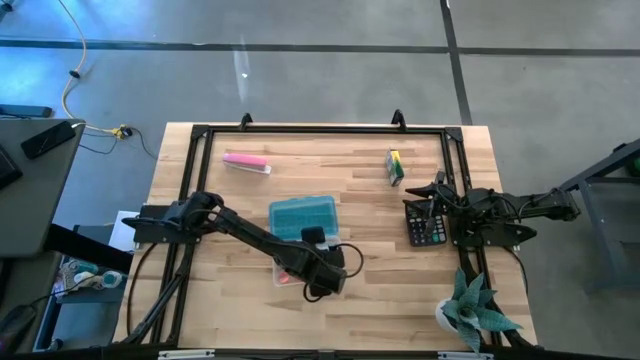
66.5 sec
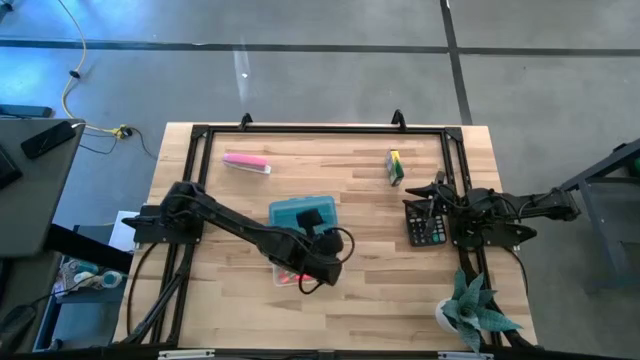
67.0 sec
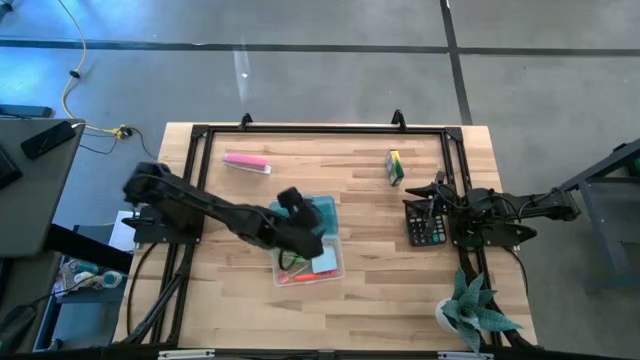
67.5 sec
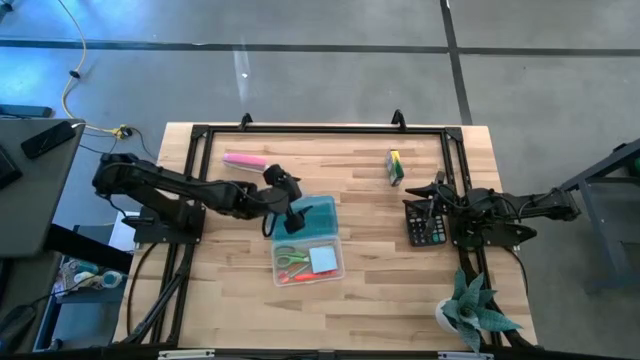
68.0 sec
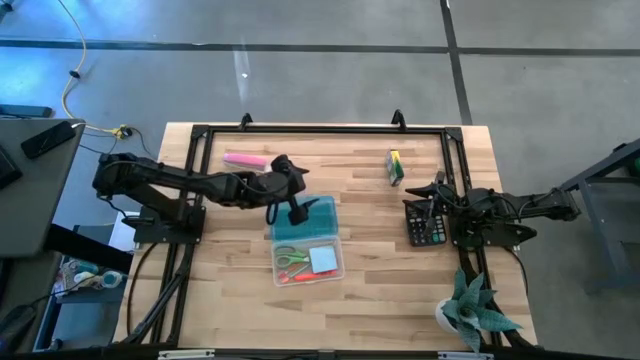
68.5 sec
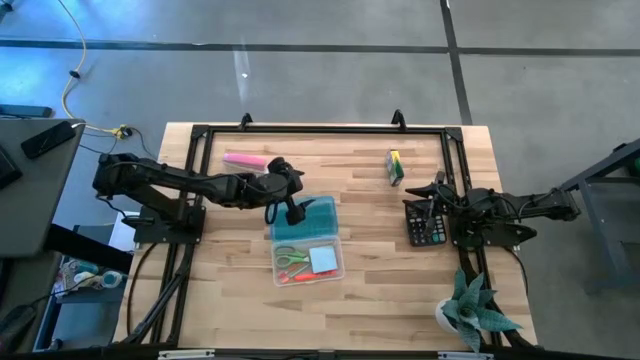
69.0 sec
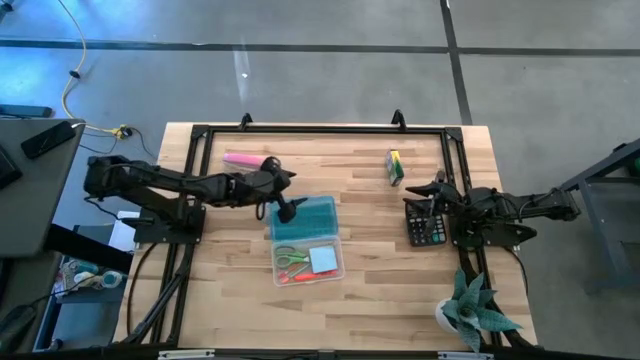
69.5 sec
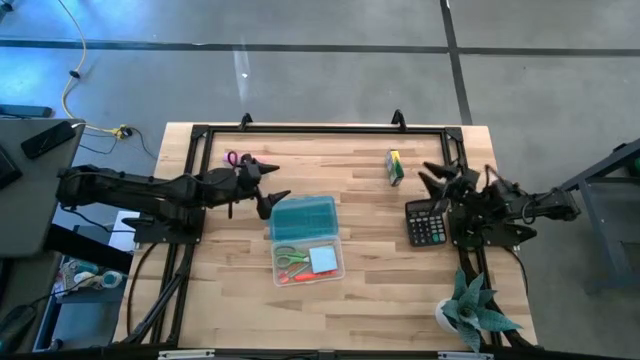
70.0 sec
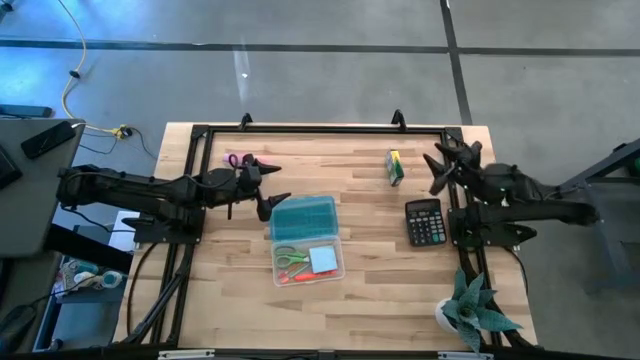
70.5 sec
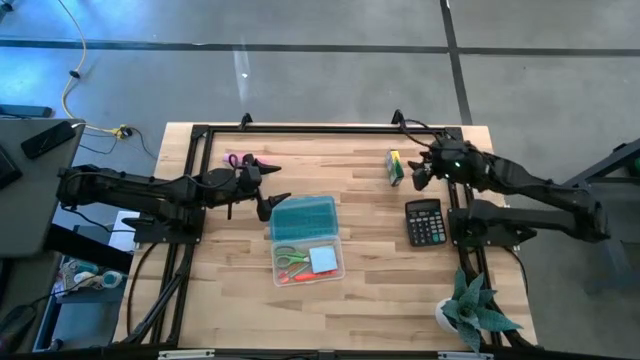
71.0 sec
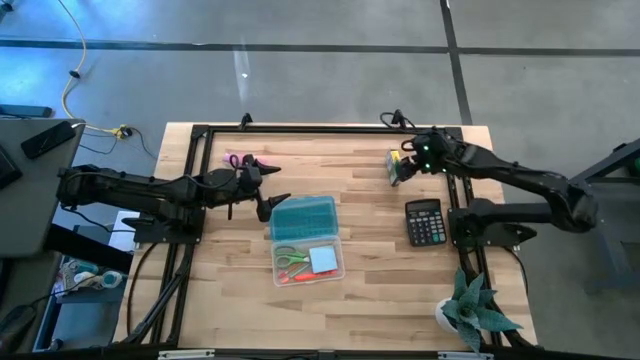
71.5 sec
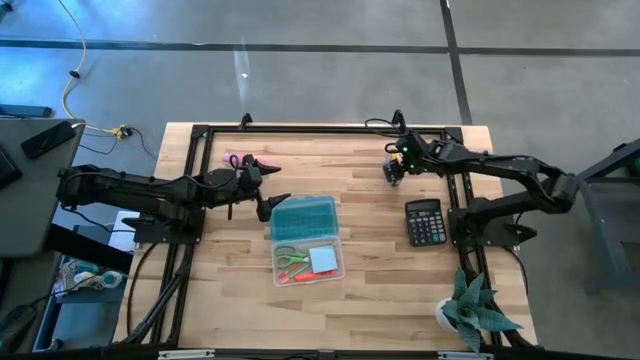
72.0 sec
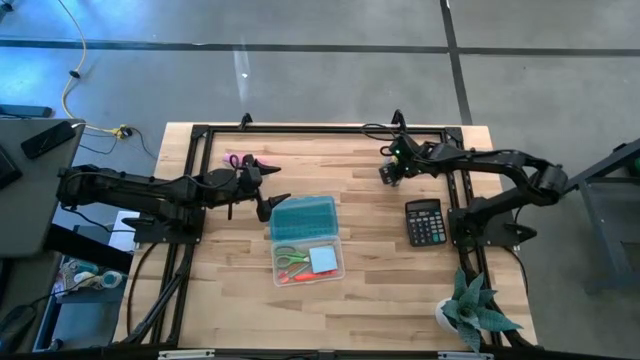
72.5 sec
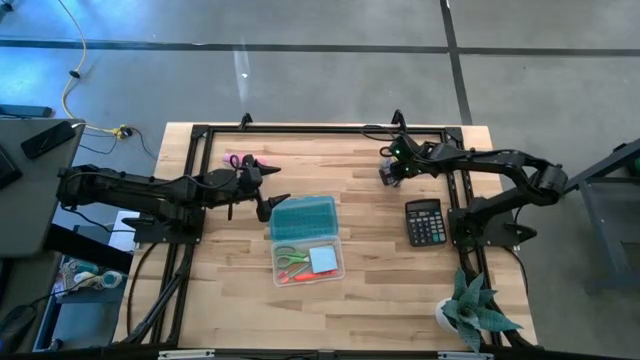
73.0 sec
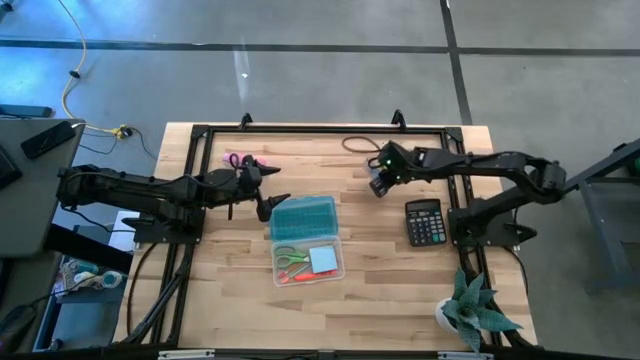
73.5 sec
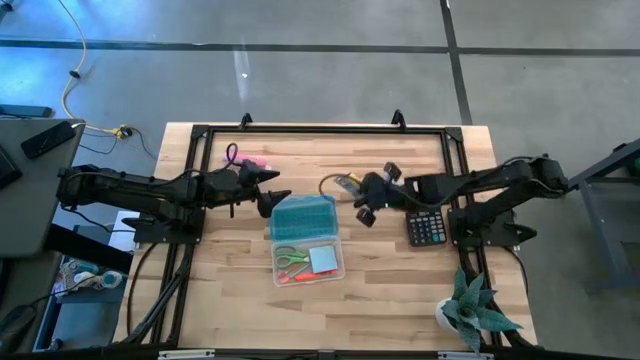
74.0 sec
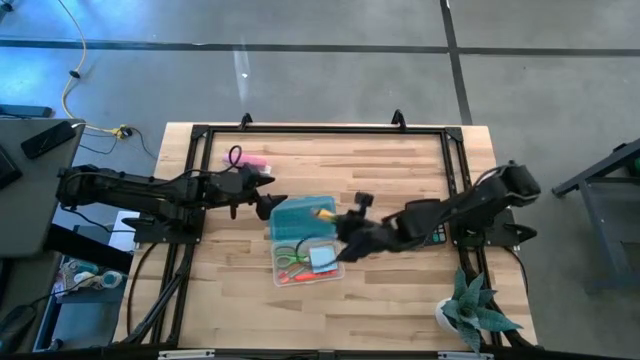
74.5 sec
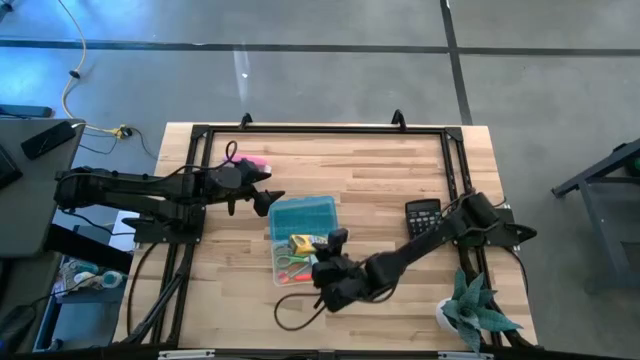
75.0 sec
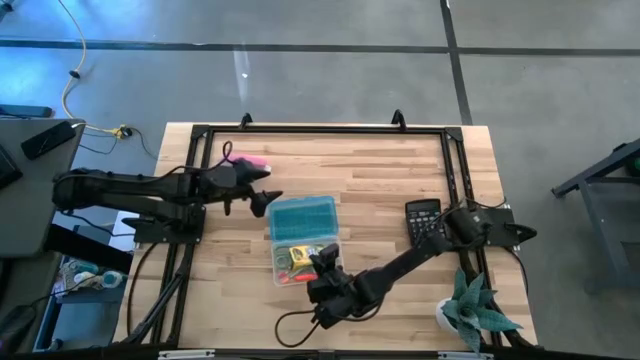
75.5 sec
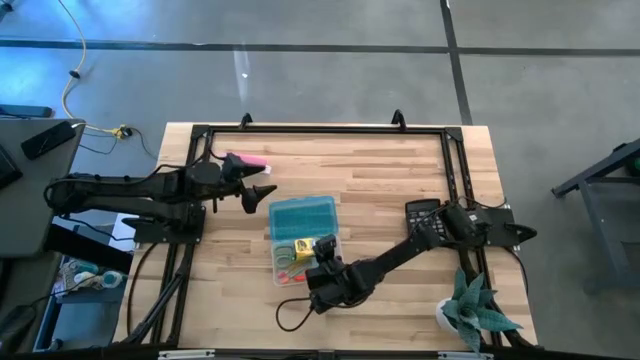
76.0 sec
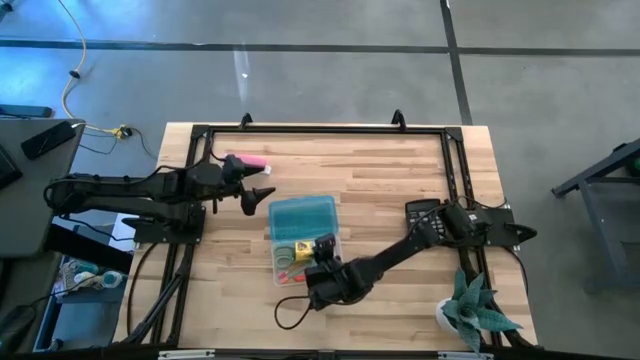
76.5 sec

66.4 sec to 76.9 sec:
Task: Pack school essentials
Put the crayon box into the supply box

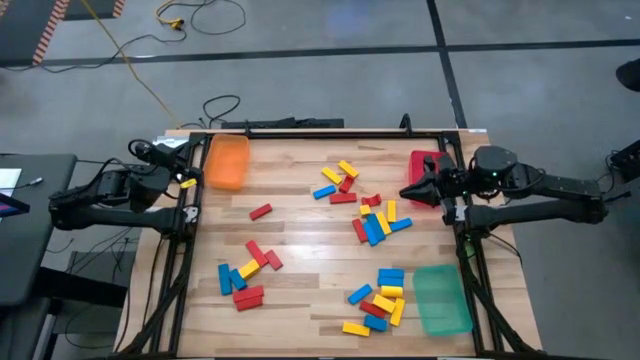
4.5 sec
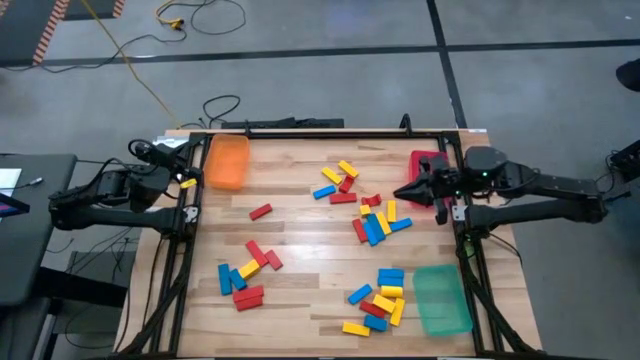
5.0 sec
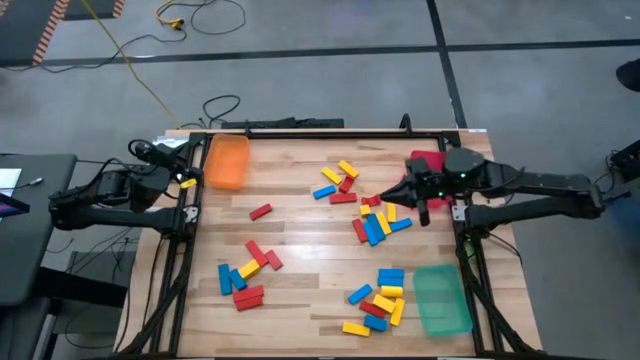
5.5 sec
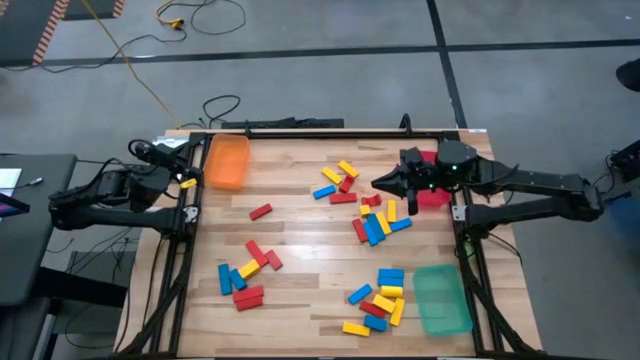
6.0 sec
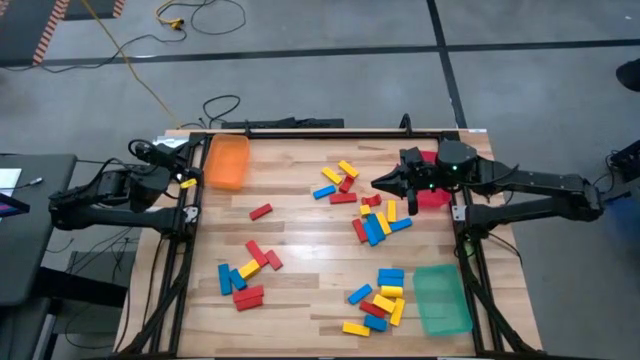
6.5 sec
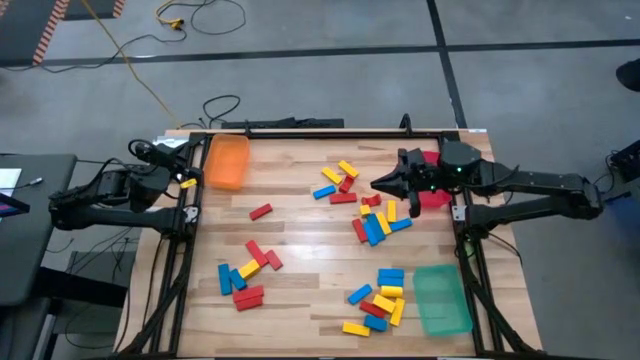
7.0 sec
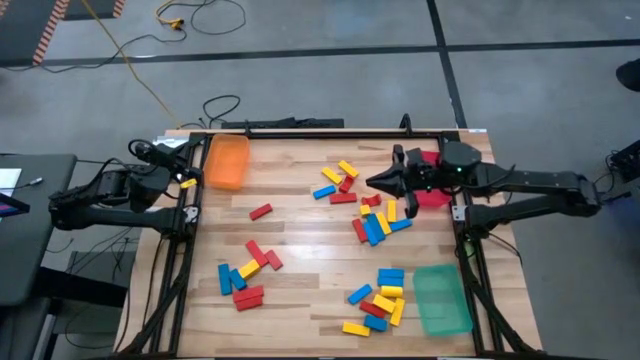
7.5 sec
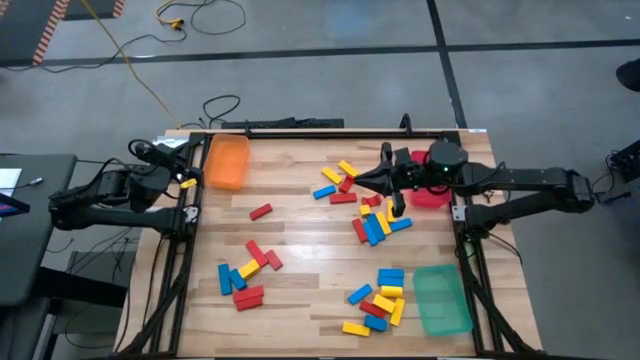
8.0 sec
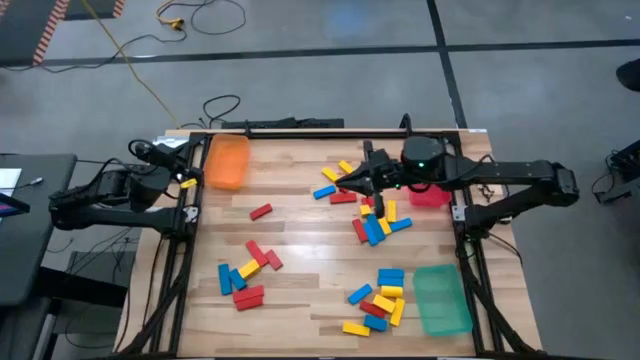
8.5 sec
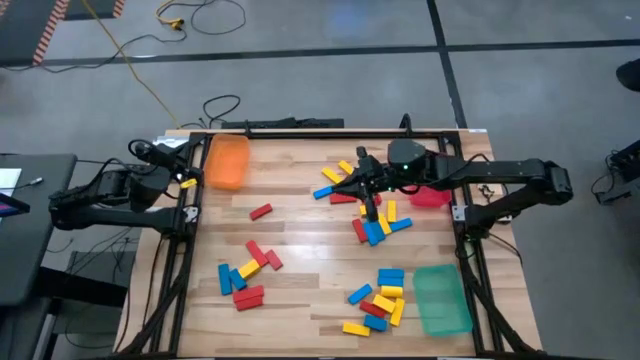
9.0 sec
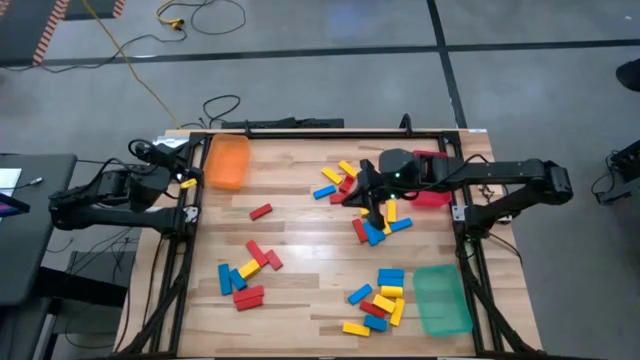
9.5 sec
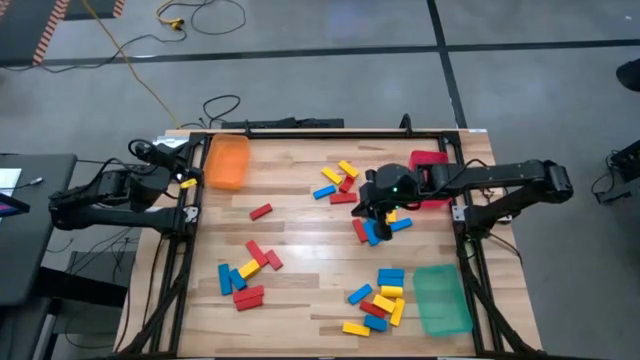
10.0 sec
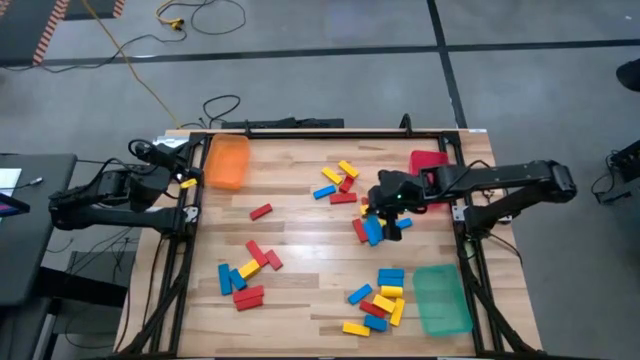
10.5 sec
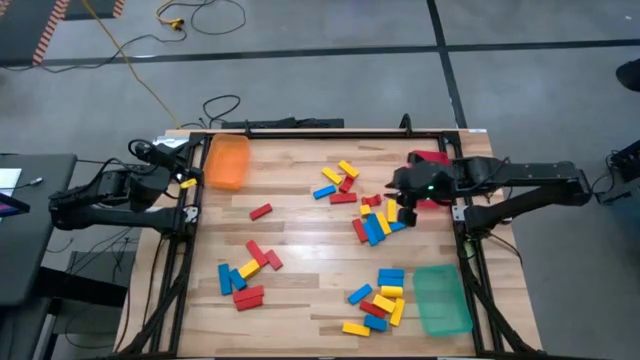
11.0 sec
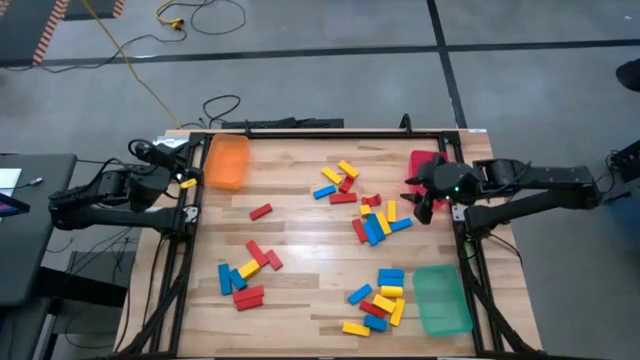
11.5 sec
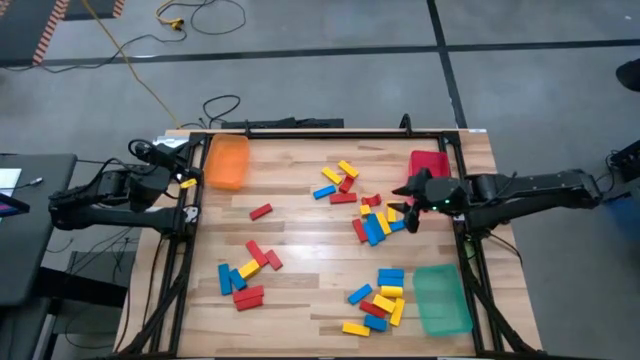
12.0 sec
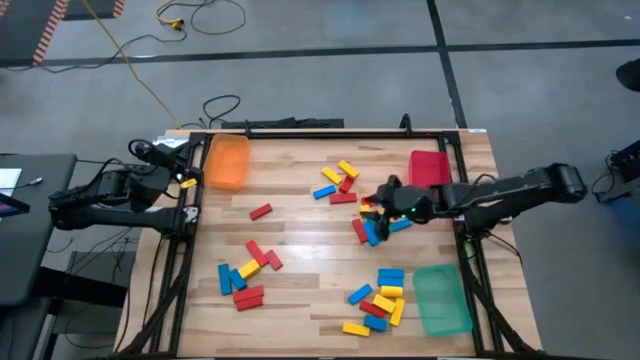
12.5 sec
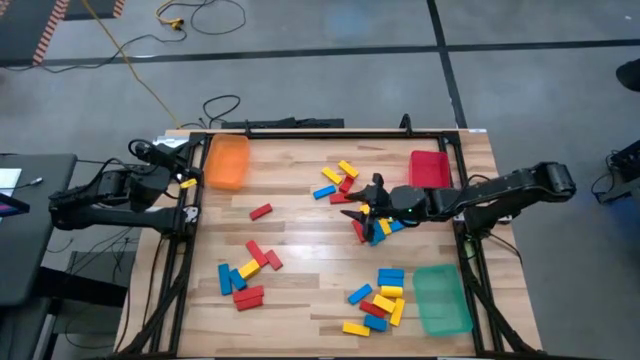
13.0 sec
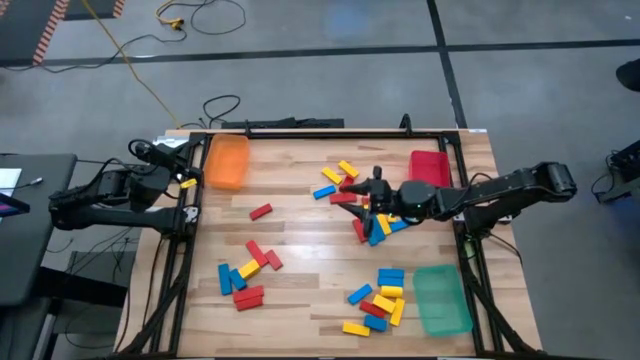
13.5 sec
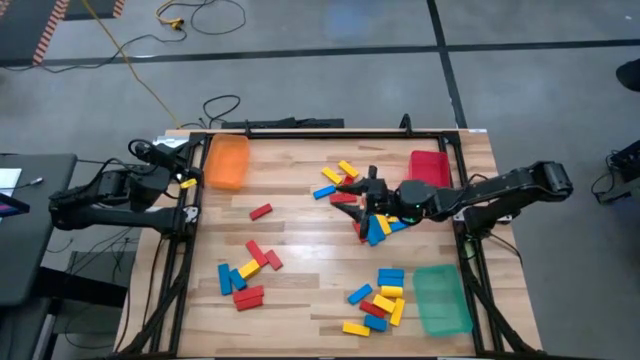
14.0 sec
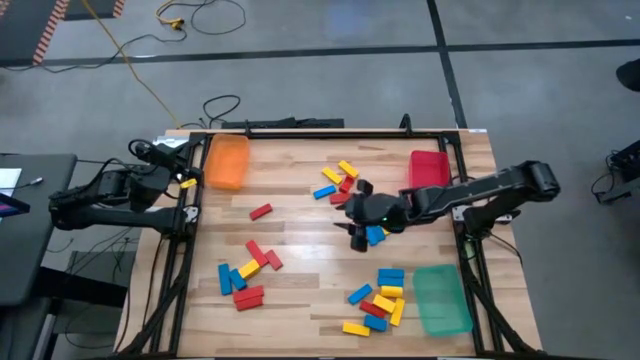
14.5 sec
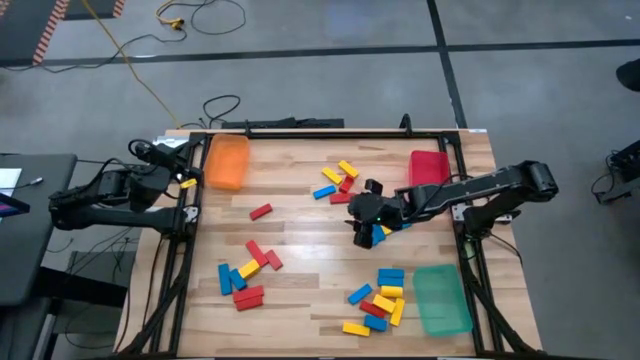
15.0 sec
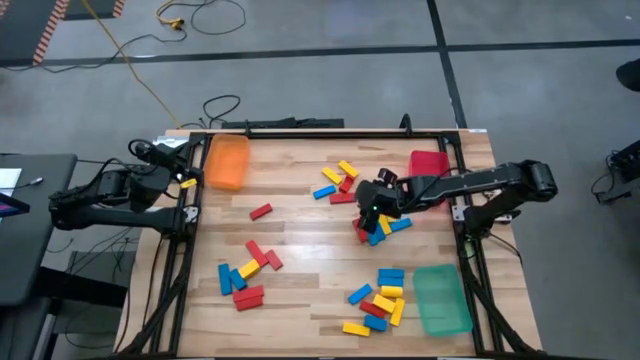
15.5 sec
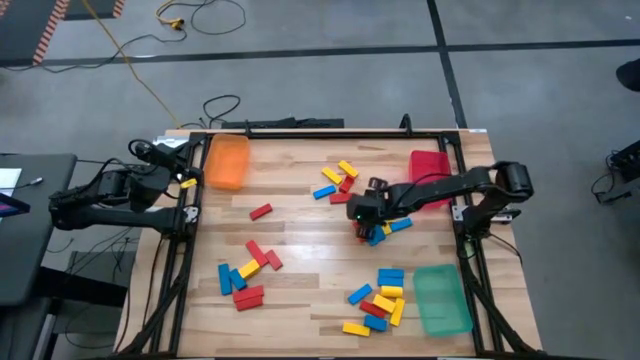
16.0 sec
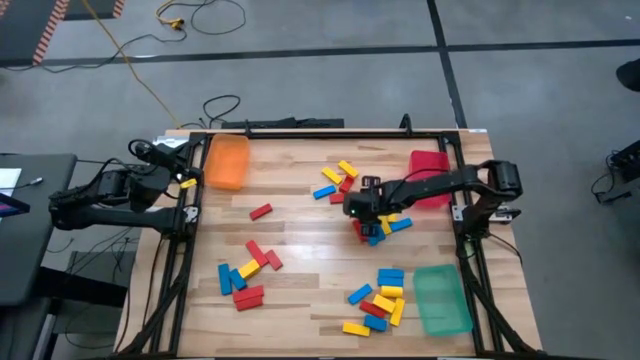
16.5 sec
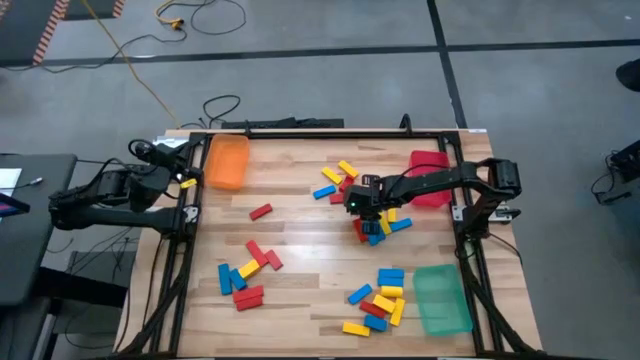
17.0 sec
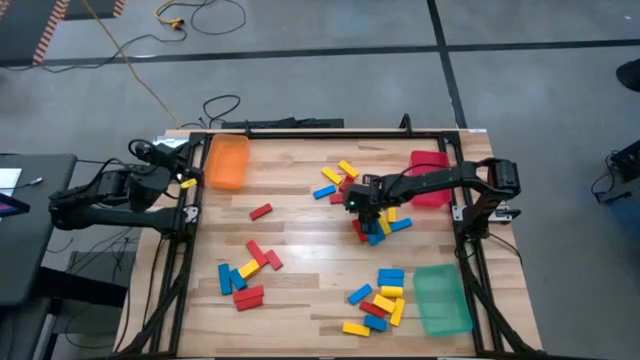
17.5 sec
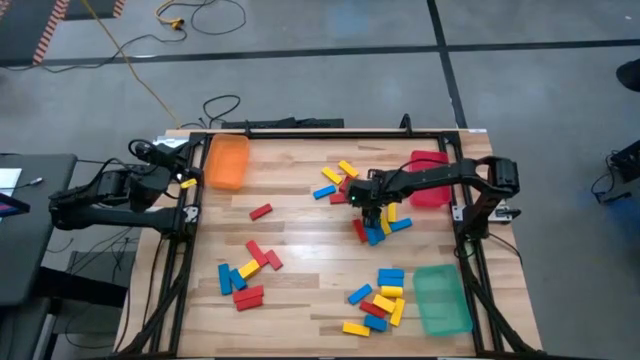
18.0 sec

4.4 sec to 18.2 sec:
Task: Sort blocks
Put the yellow square block into the red bin
